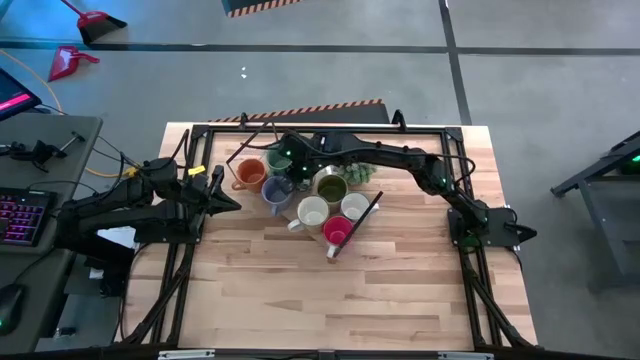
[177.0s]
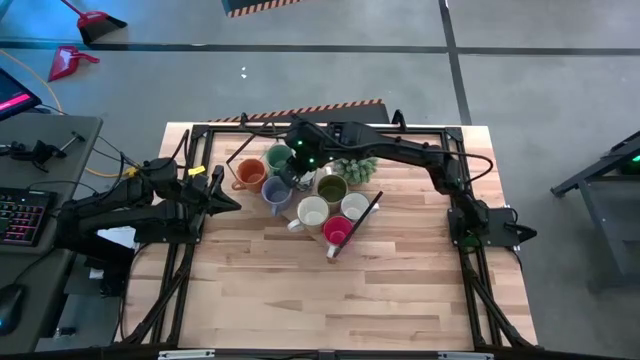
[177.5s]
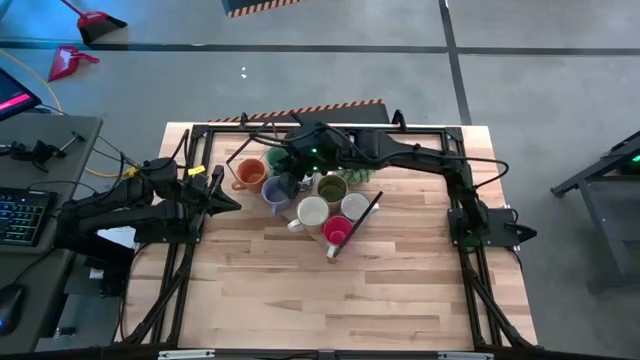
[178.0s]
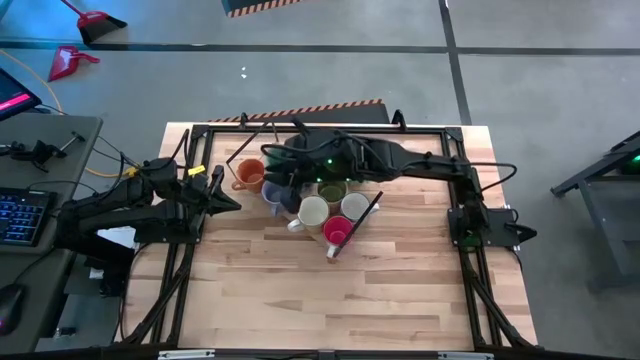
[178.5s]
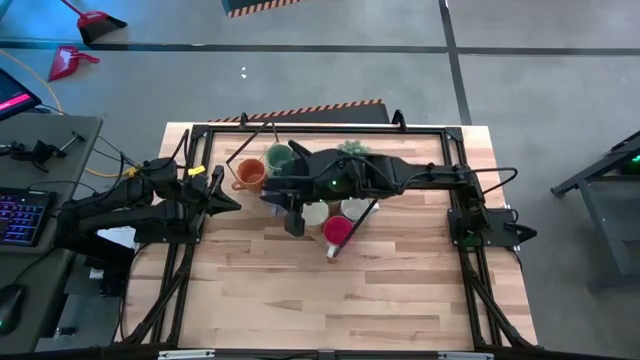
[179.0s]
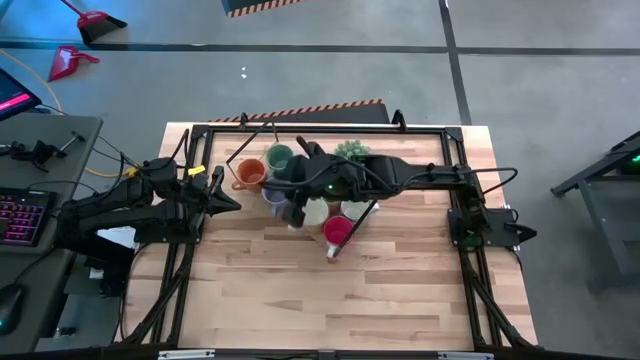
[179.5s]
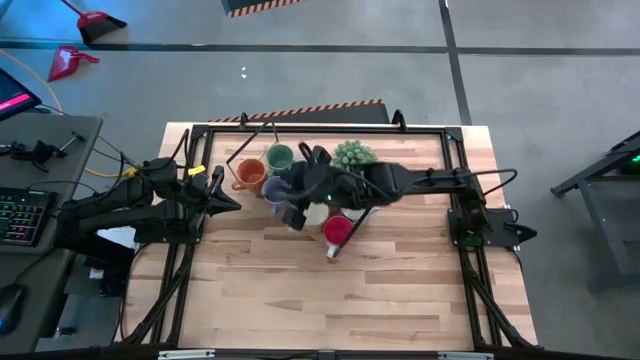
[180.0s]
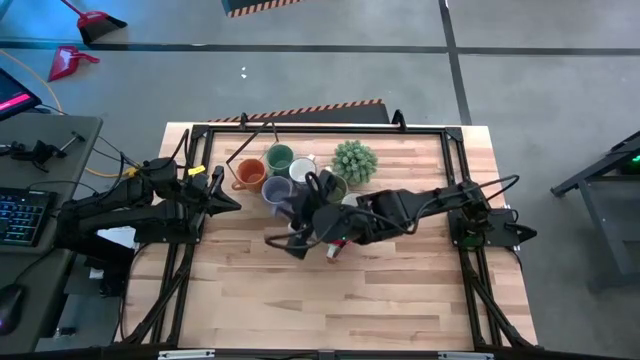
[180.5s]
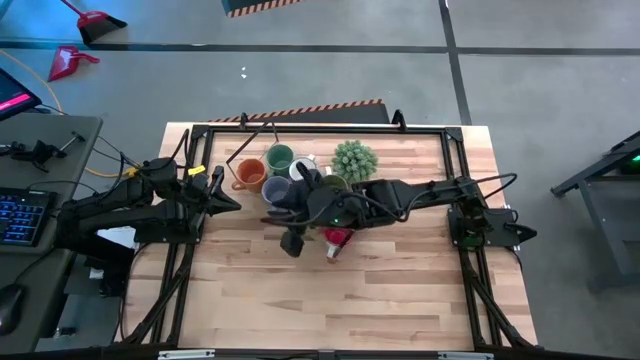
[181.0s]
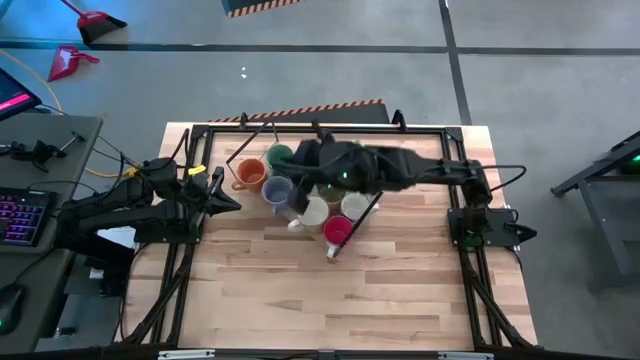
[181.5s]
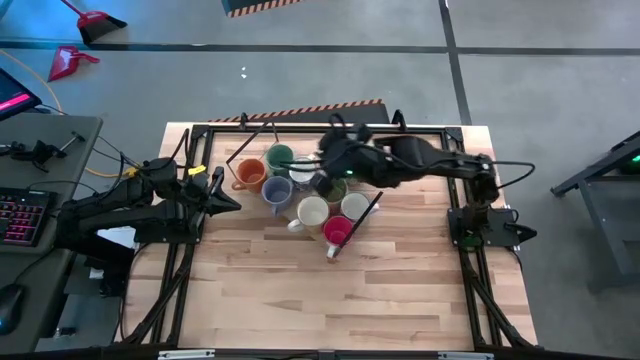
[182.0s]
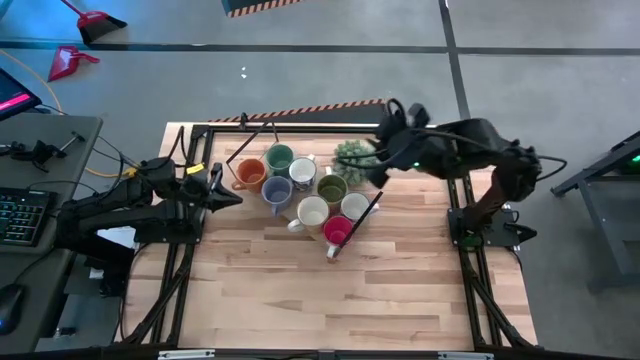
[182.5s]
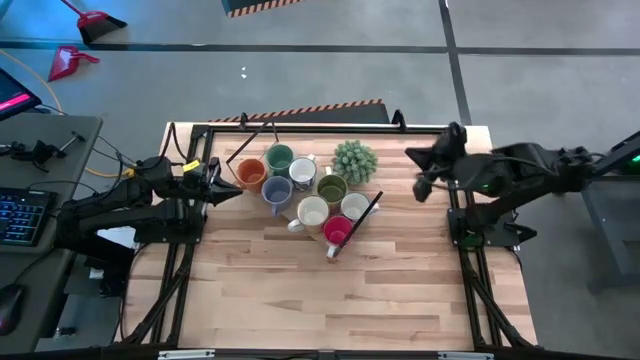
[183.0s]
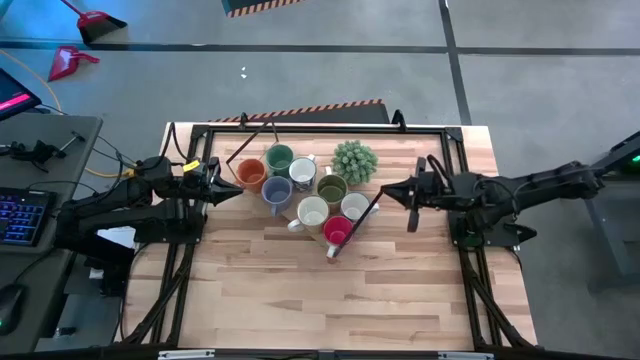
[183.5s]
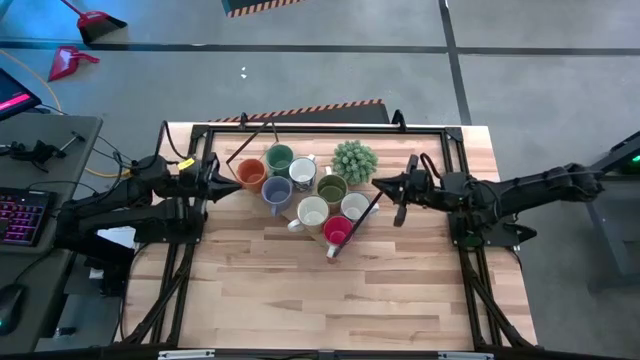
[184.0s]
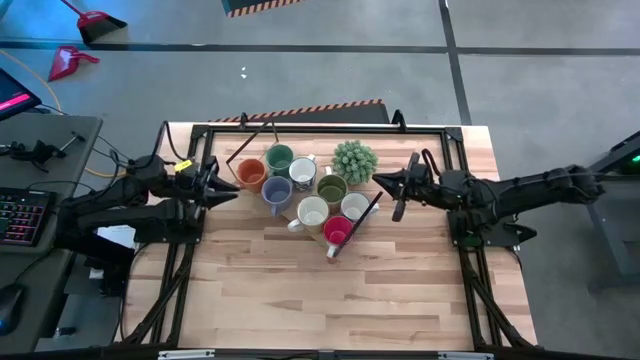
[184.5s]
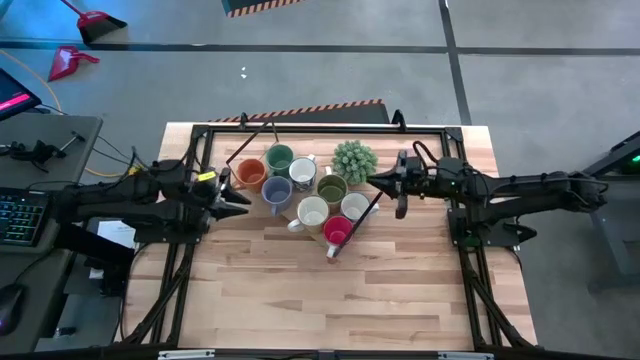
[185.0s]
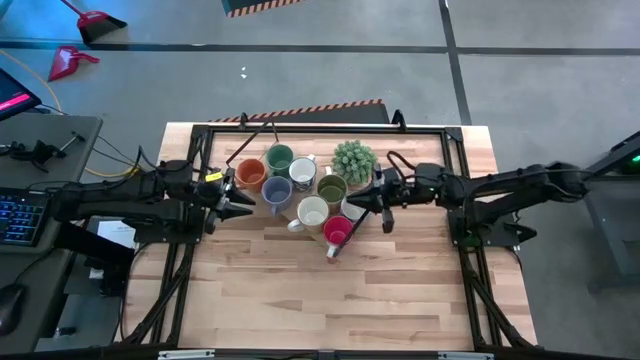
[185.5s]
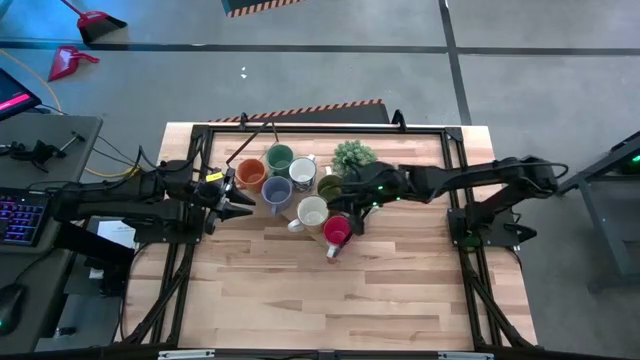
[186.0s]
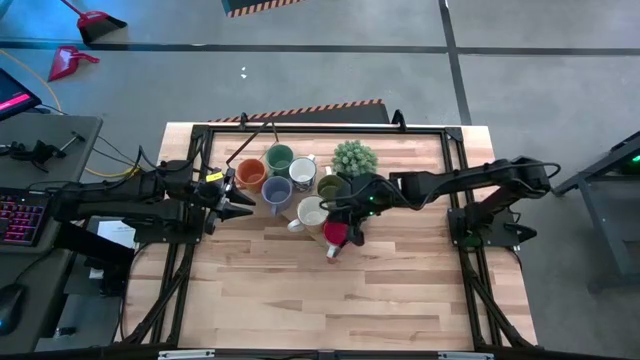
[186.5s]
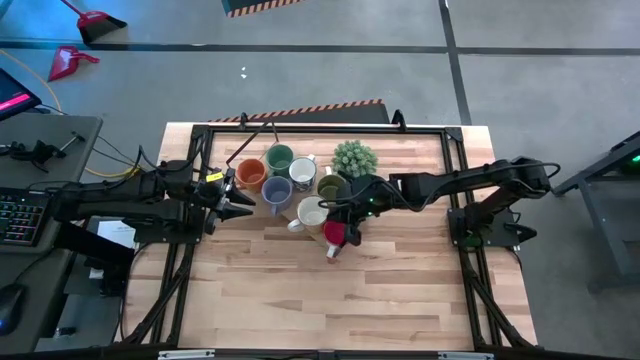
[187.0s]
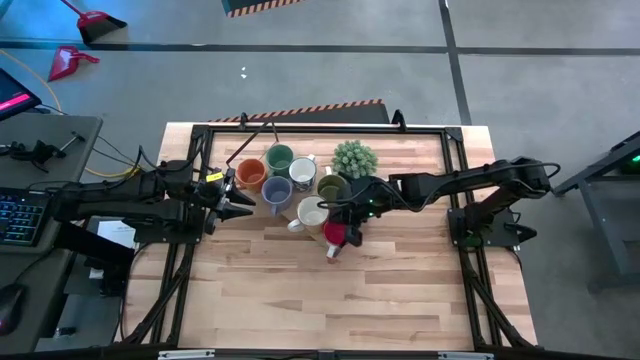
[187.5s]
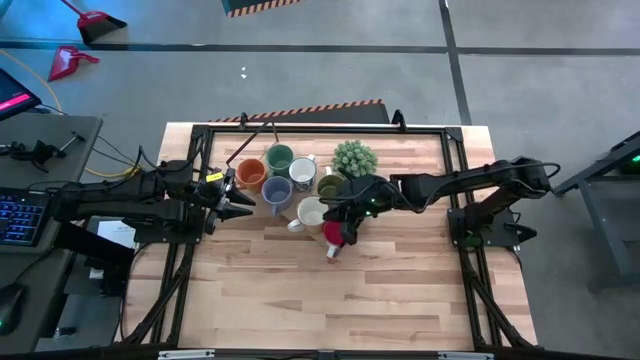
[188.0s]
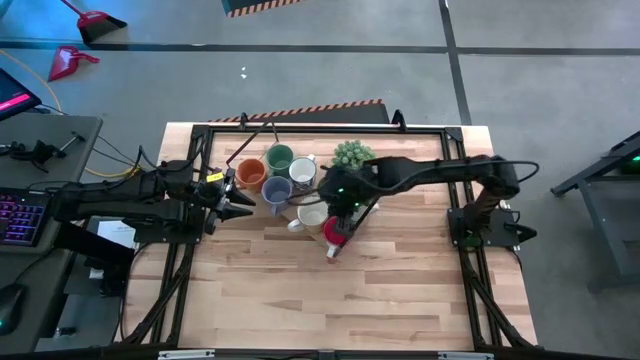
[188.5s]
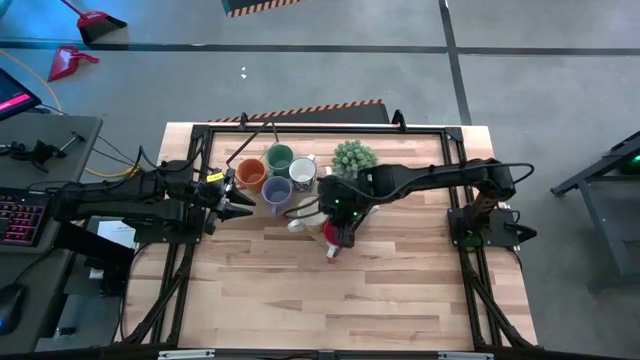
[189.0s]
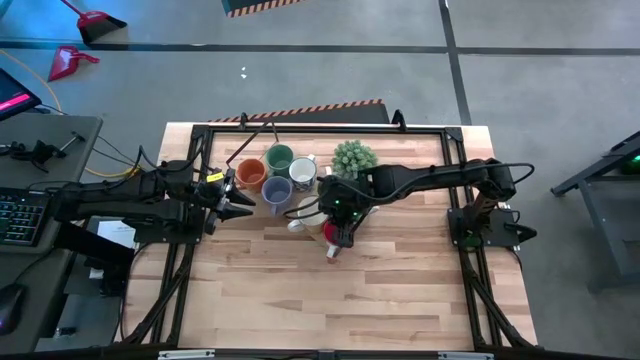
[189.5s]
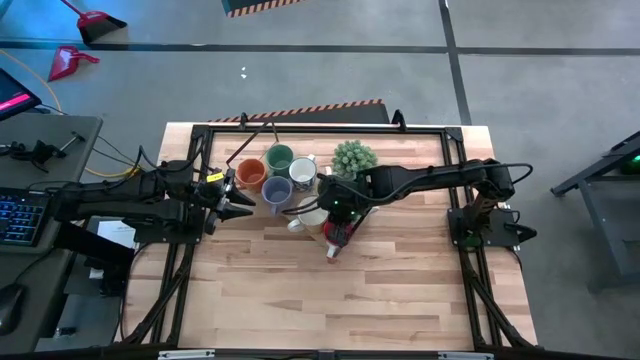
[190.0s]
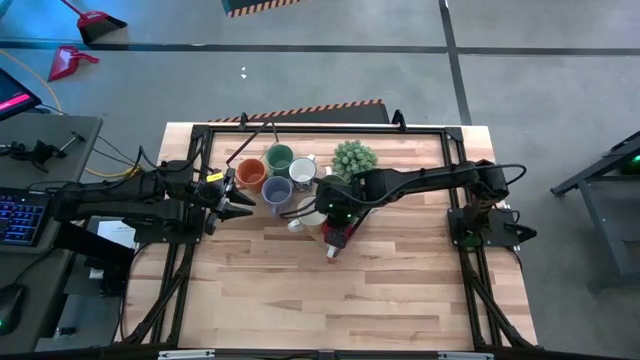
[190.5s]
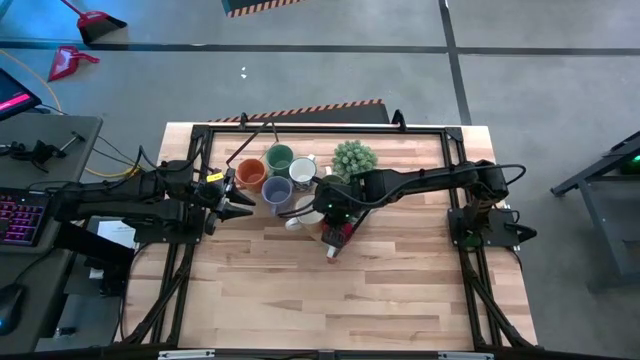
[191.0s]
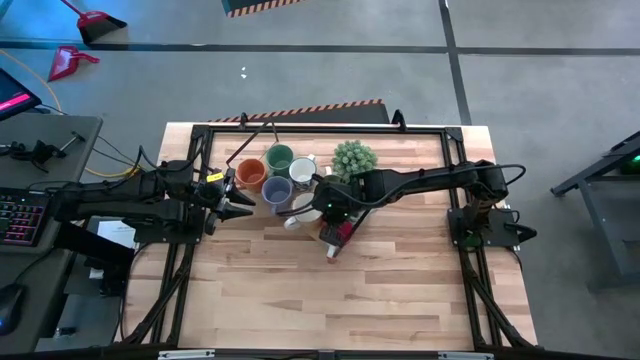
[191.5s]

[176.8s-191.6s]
Task: Place coffee mugs
Adjust the yellow mug on the shelf

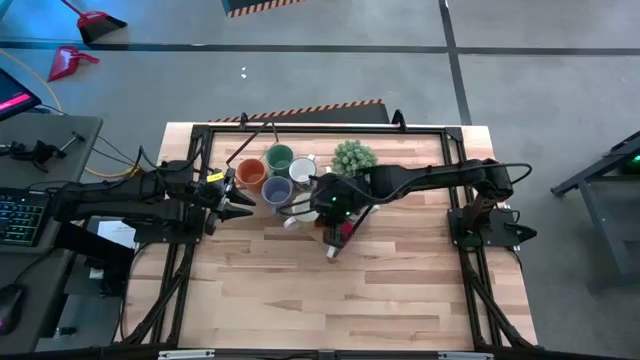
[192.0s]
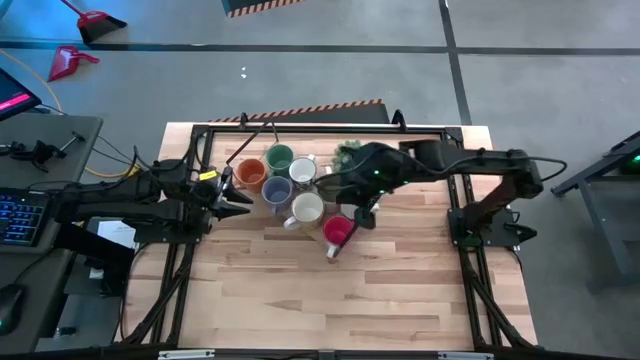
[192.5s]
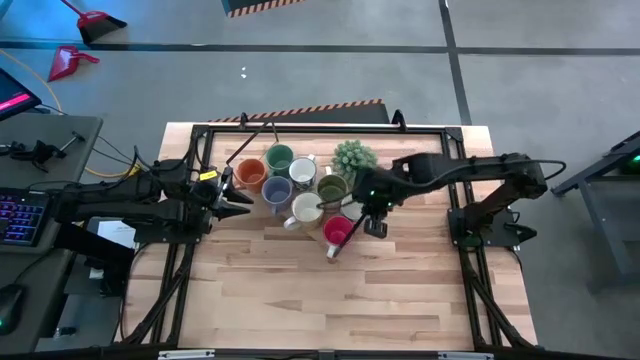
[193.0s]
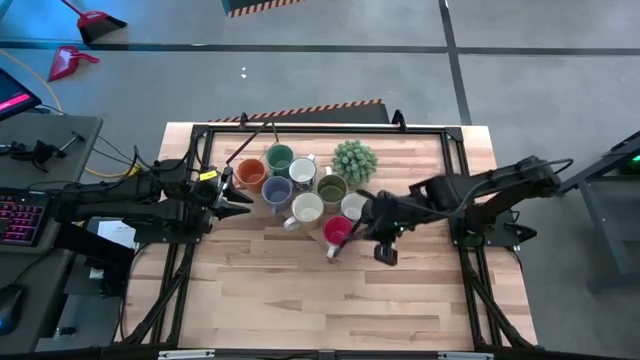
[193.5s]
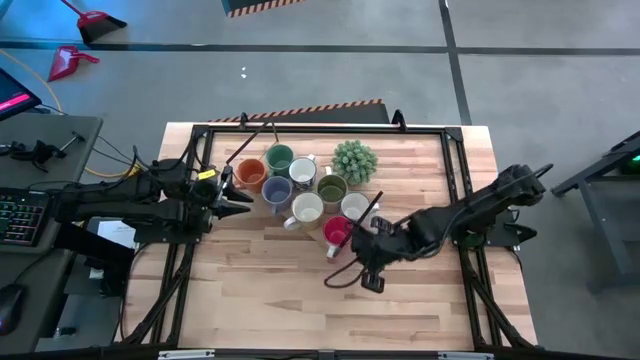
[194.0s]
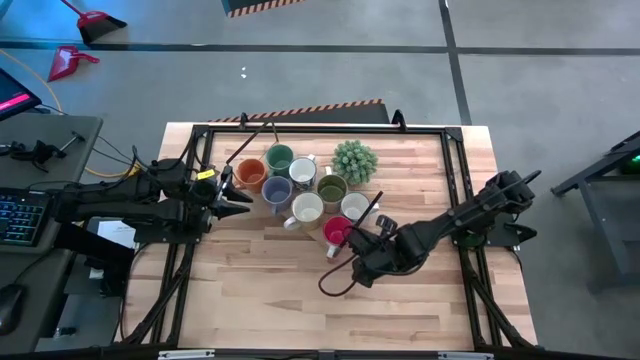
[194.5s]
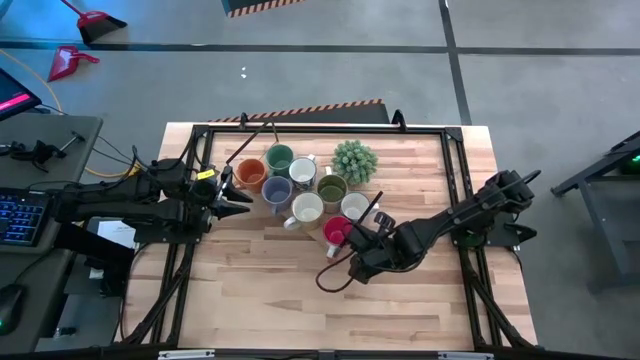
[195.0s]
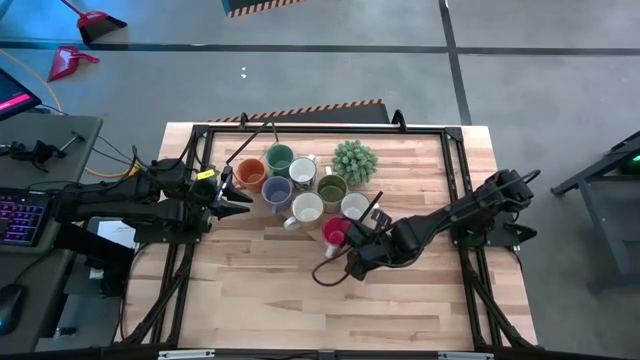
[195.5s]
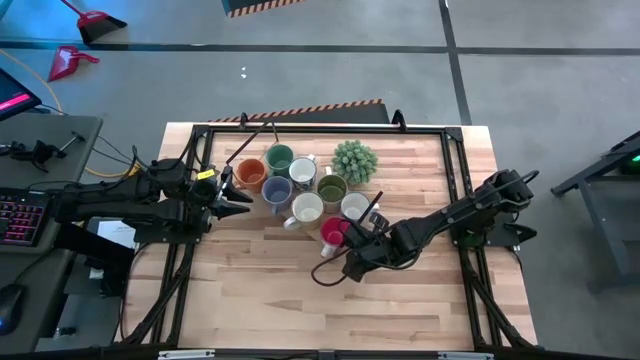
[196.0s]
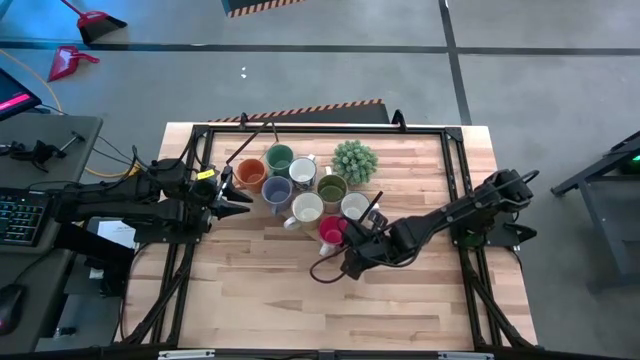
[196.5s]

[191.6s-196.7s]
Adjust the red mug on the shelf

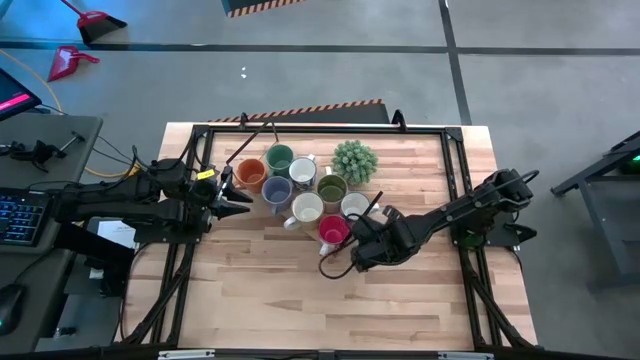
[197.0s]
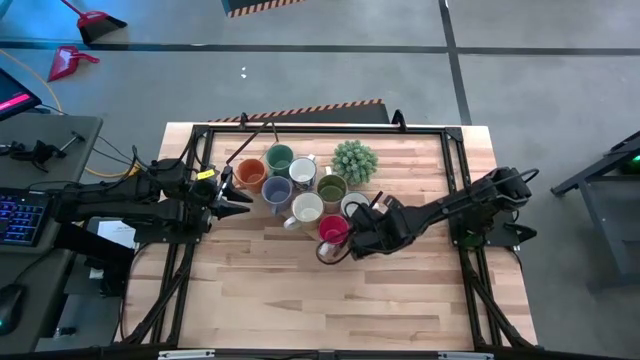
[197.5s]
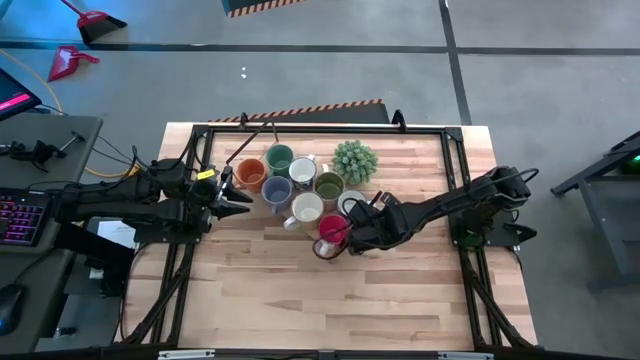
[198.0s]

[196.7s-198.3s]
Adjust the blue patterned mug on the shelf
